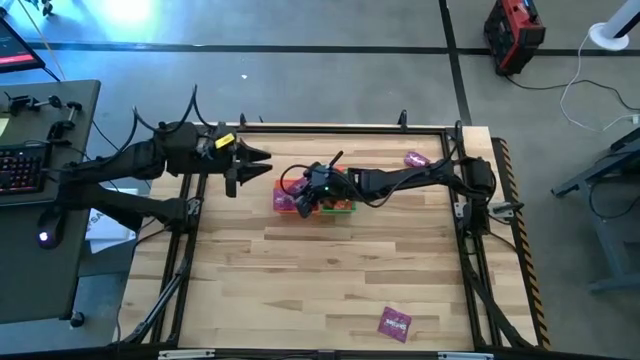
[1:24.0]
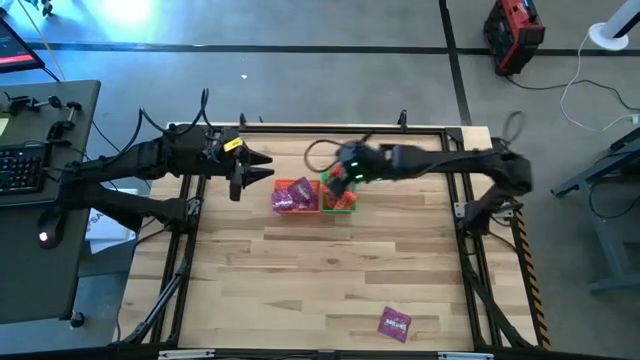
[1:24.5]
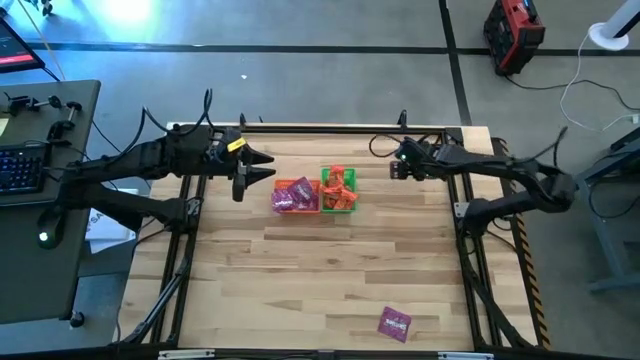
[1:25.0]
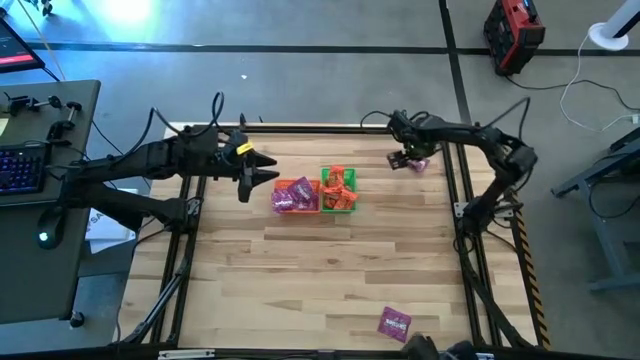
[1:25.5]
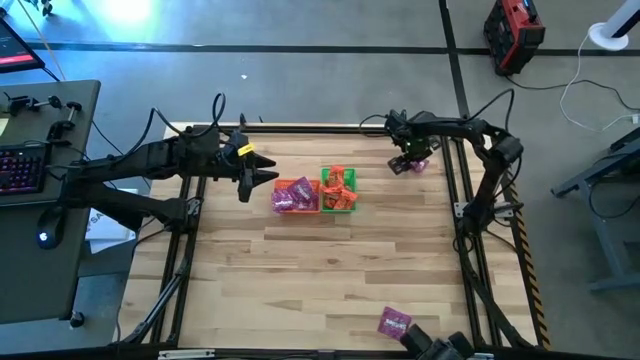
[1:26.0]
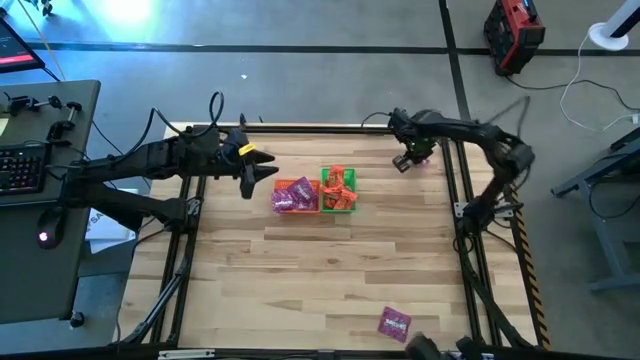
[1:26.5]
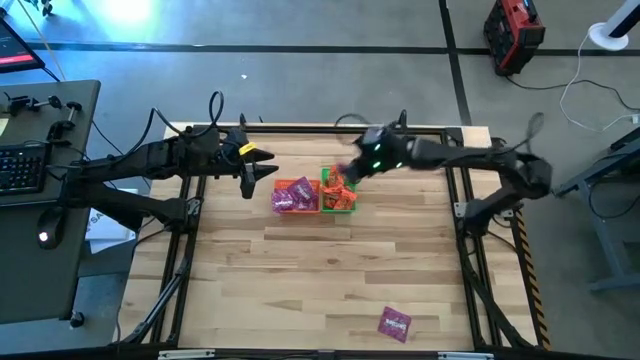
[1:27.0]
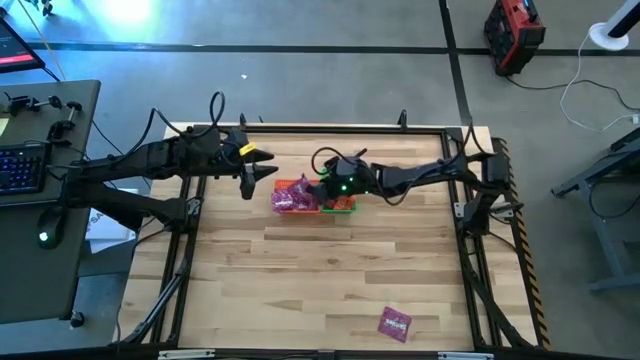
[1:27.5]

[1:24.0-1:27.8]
Task: Sort candy by brand, put in halloween buckets
Put the violet candy into the orange bin

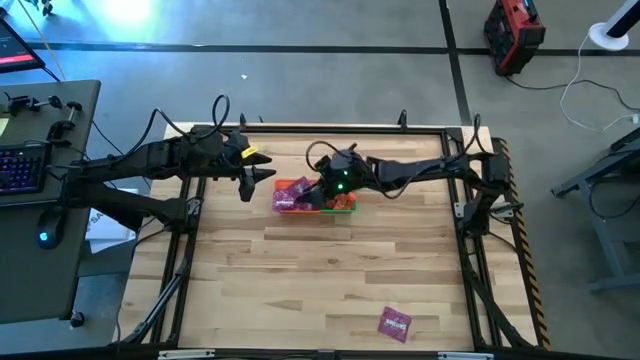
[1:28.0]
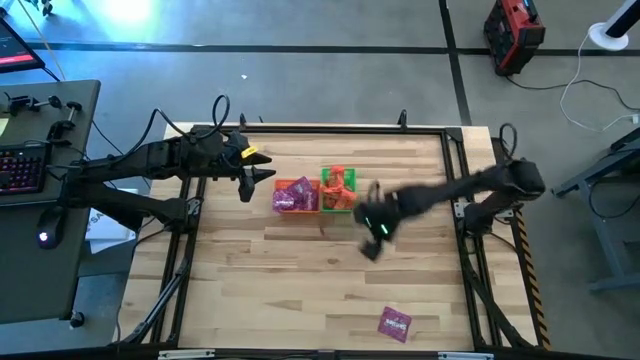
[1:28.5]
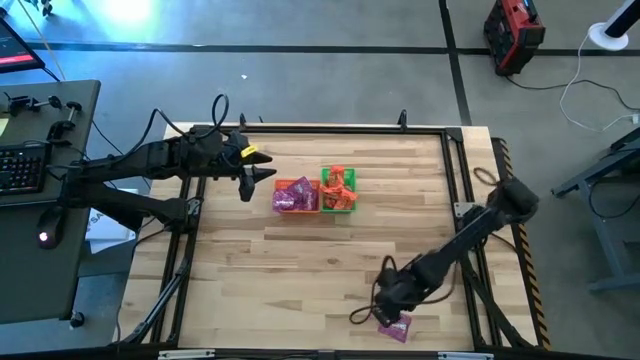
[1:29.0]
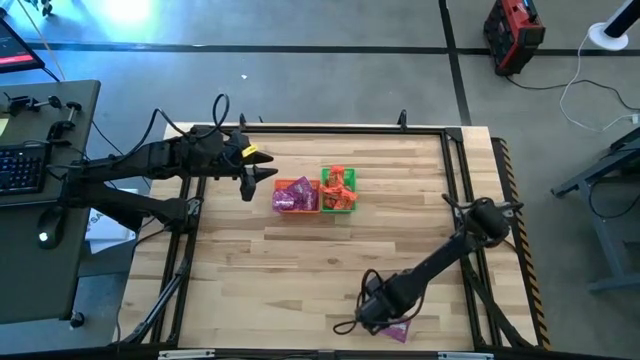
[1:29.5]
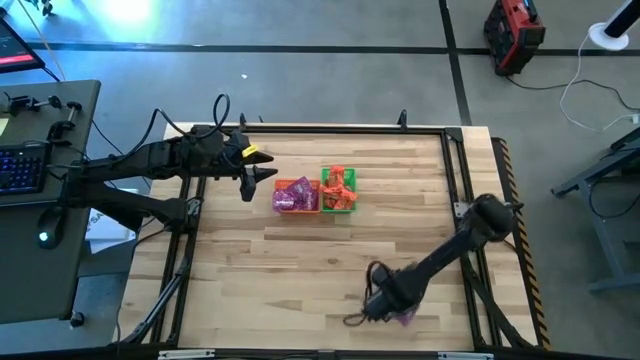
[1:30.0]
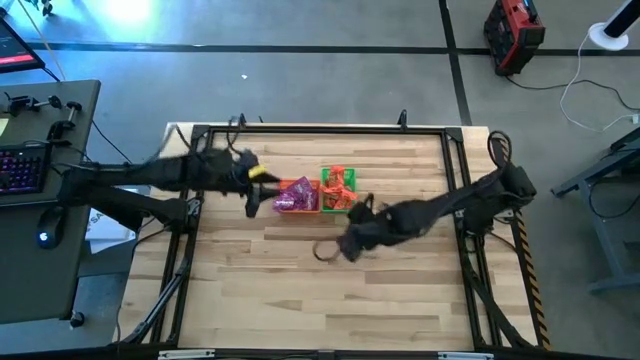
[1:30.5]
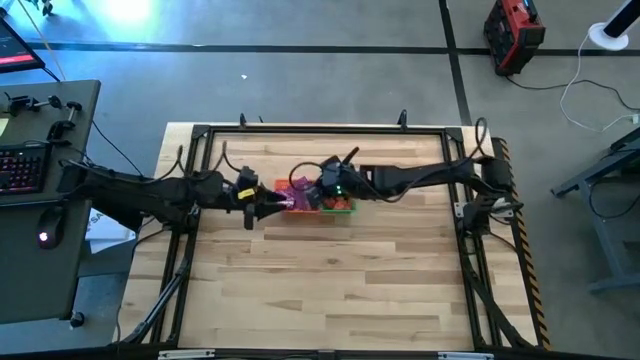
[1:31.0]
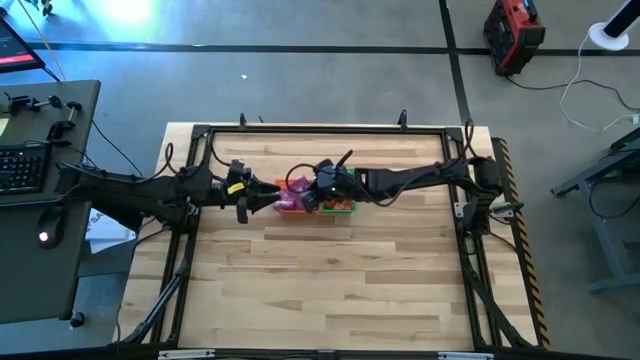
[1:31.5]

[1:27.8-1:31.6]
Put the violet candy into the orange bin

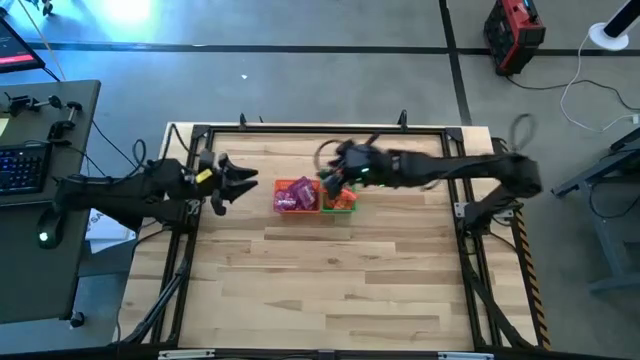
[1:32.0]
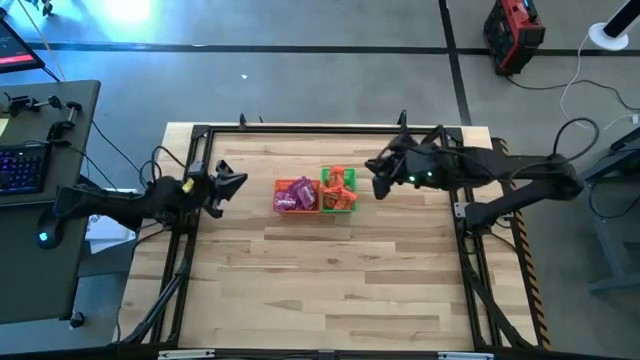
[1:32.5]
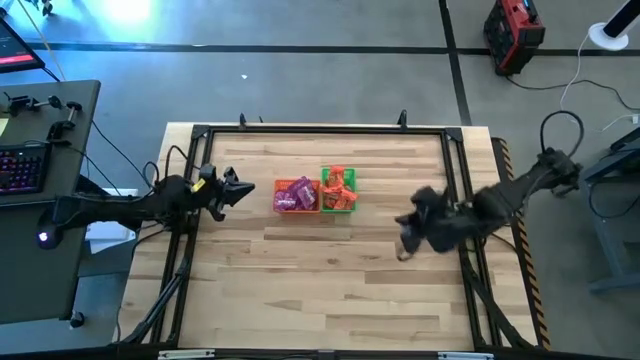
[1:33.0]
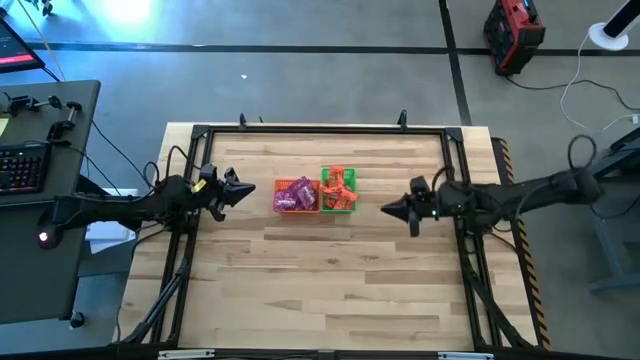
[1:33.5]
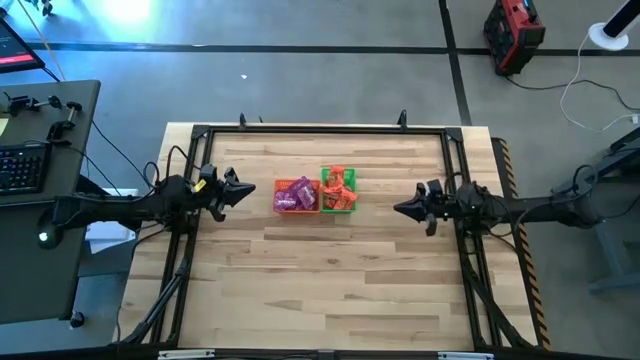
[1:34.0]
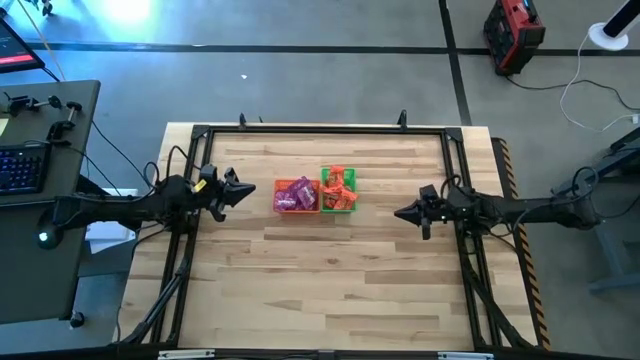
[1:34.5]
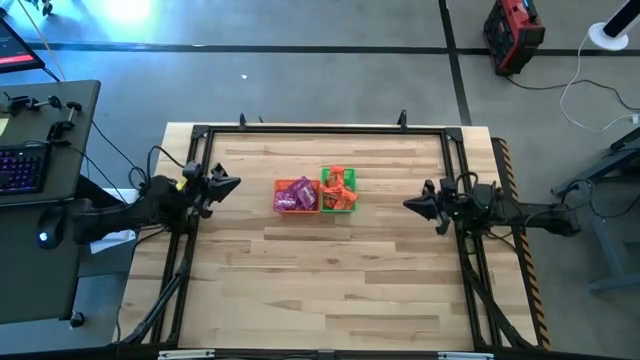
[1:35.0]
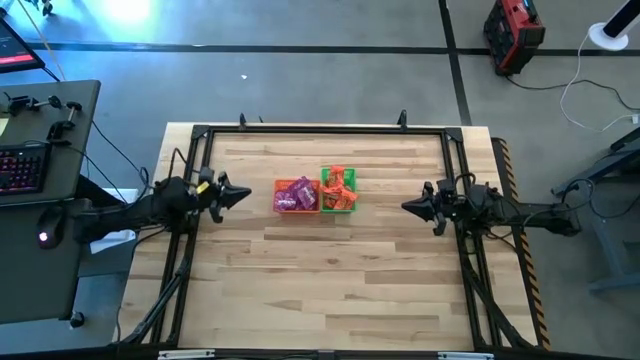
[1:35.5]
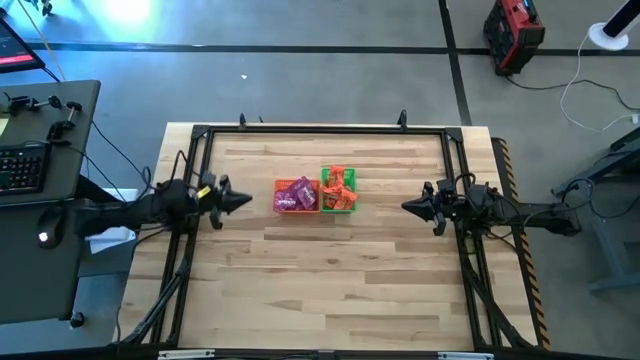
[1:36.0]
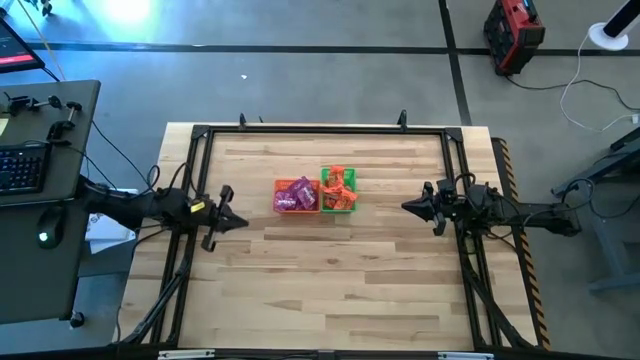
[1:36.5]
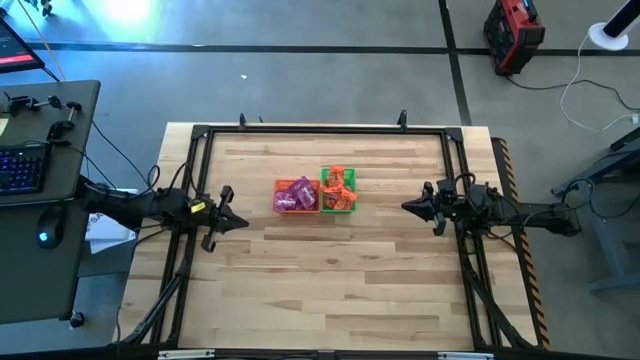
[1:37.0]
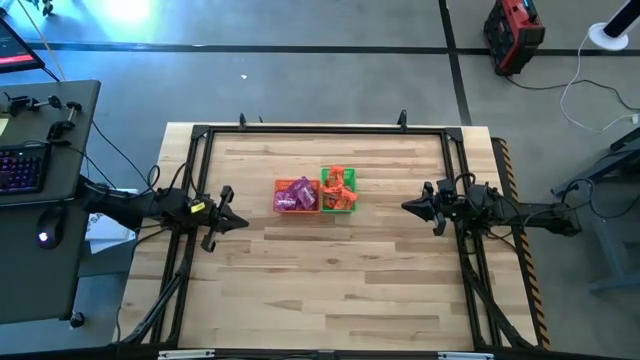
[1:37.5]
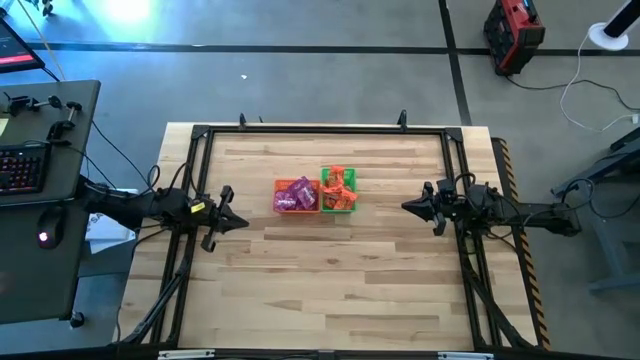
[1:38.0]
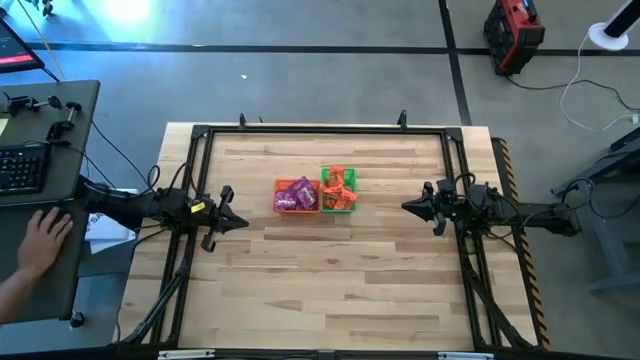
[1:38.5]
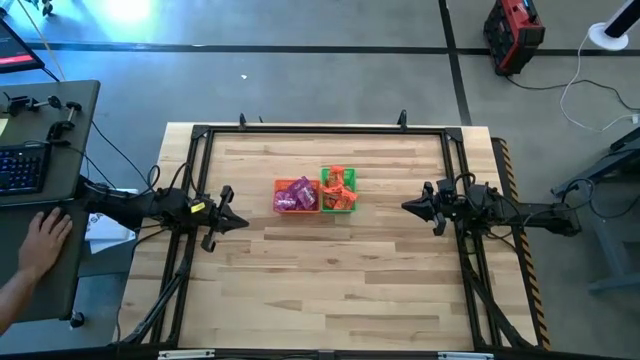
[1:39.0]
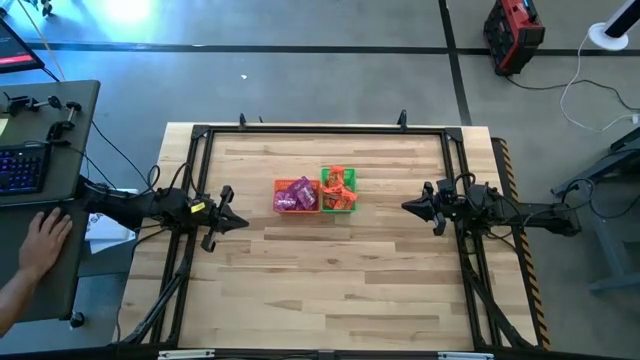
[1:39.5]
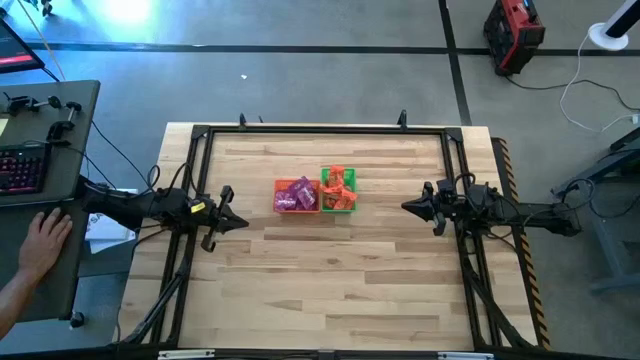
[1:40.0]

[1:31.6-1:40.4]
Return to Home Position

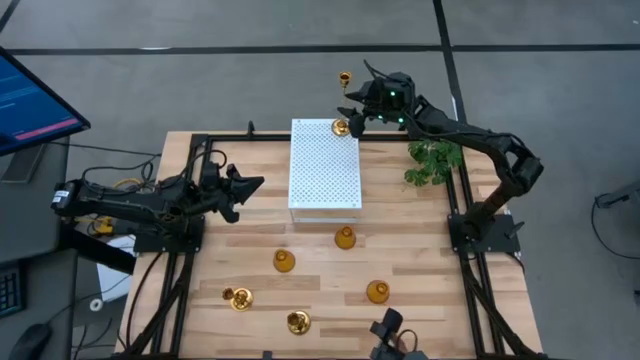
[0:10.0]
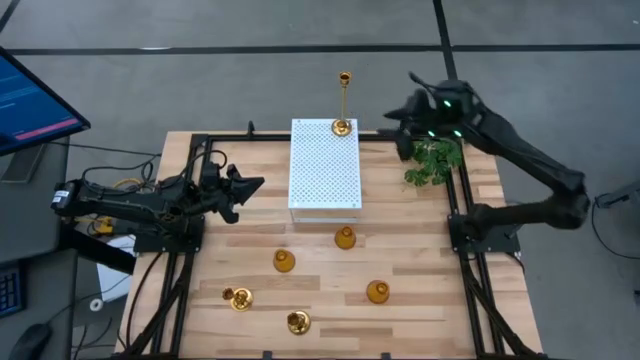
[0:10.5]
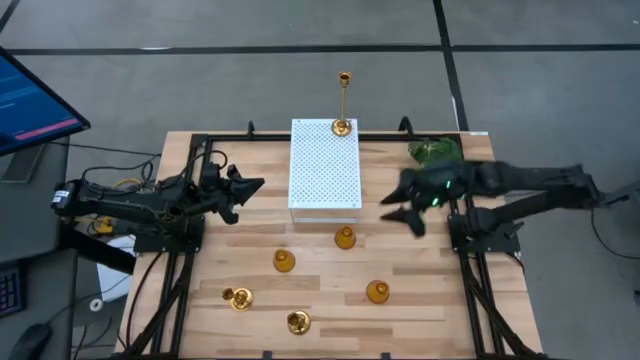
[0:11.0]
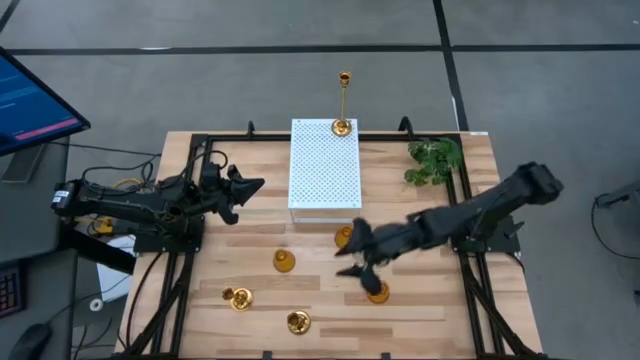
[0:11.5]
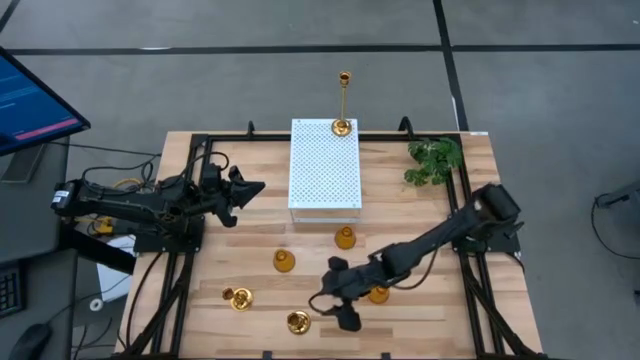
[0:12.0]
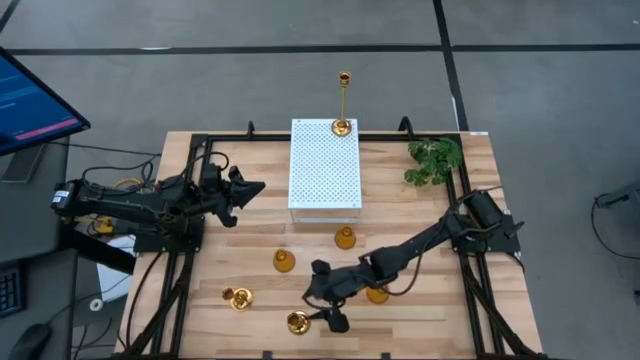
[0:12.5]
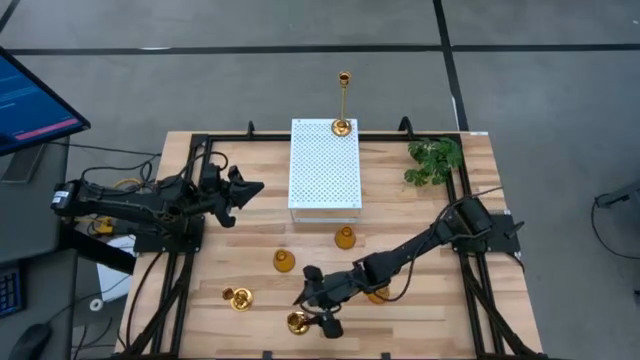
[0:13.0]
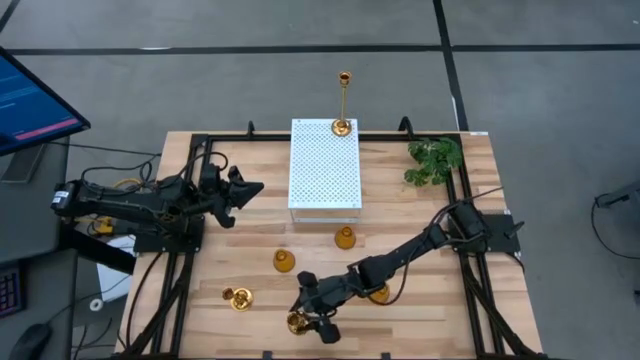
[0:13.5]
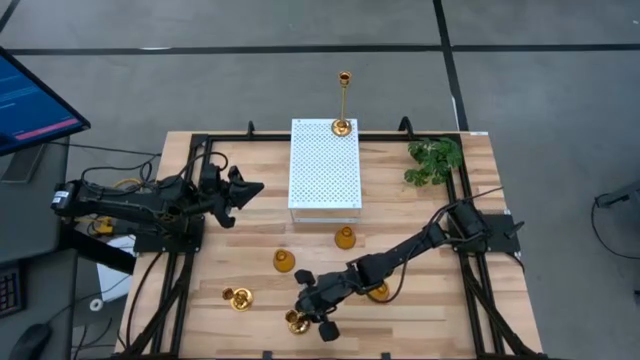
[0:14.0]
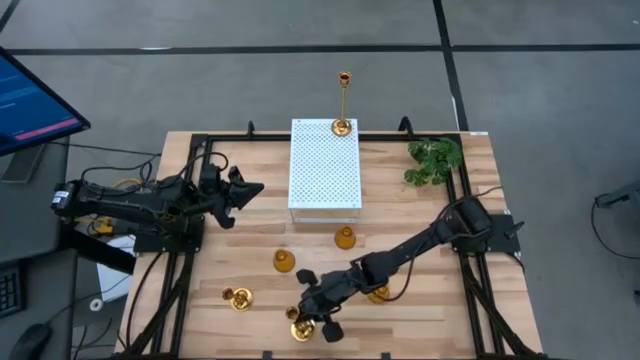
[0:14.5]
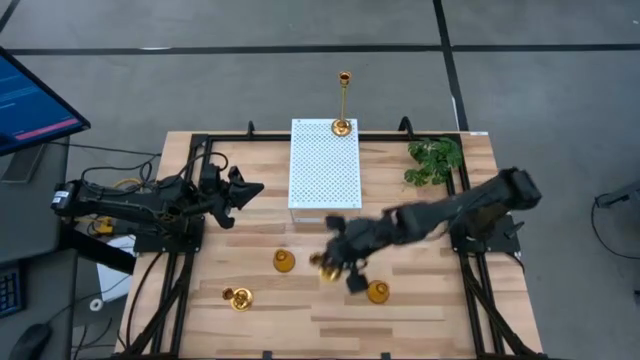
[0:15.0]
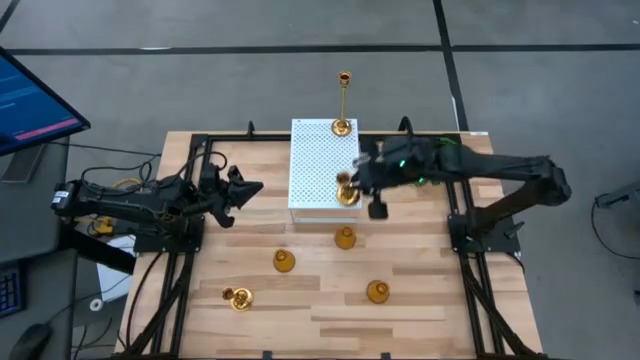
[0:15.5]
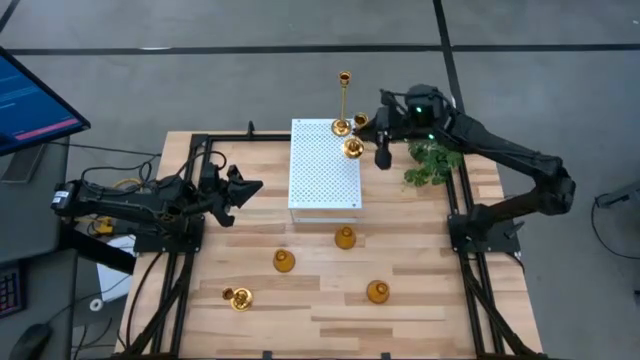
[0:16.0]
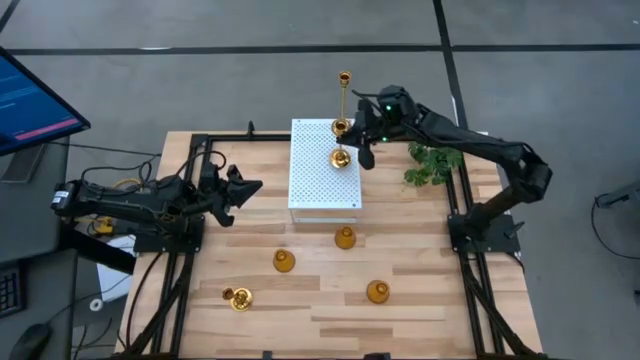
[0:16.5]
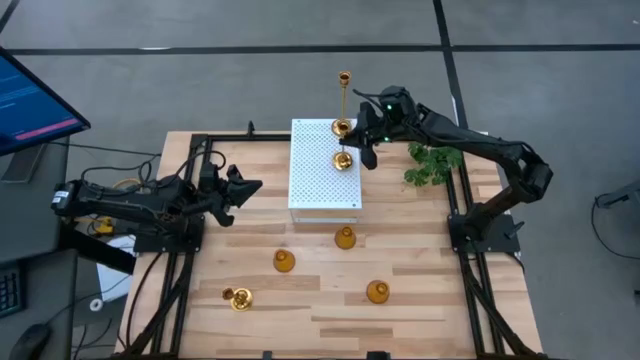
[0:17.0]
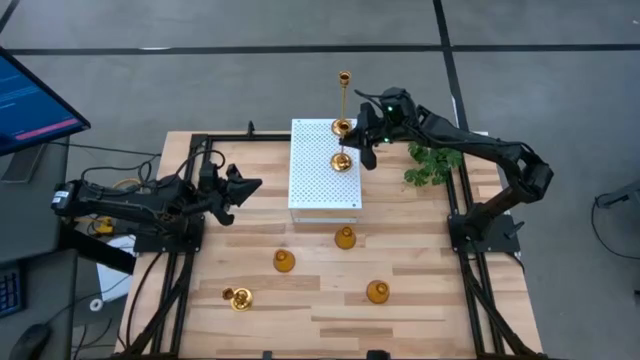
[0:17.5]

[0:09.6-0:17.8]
Task: Pick & Place candle stick holders
Align the right gold candle holder with the other gold candle holder on the shelf
